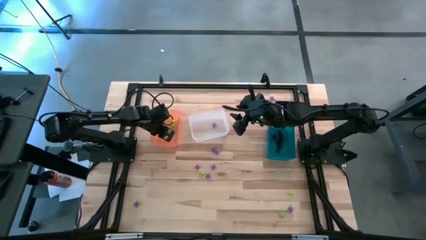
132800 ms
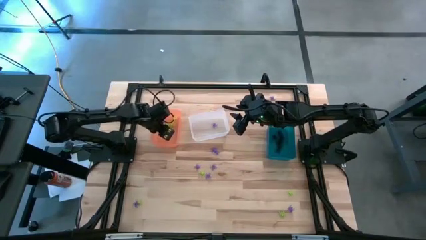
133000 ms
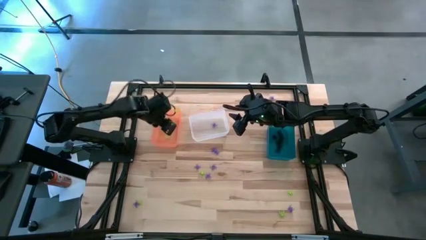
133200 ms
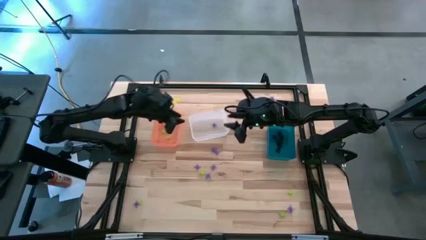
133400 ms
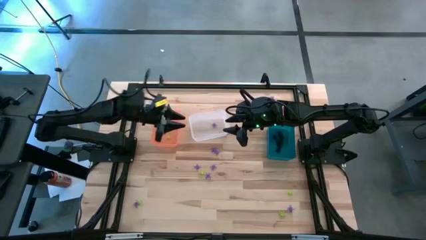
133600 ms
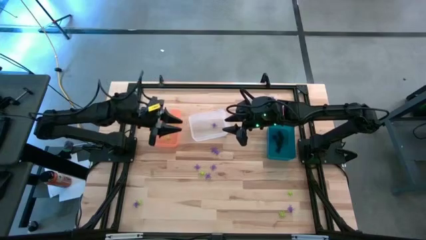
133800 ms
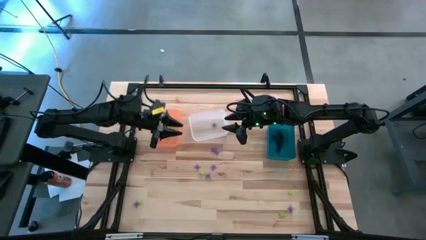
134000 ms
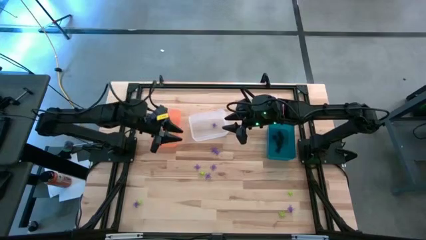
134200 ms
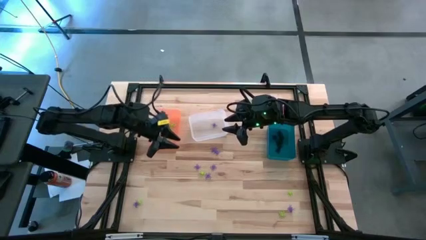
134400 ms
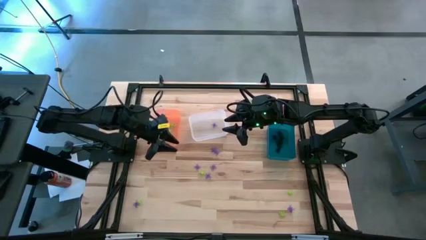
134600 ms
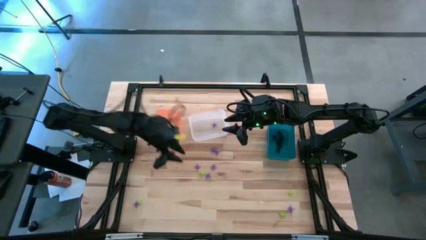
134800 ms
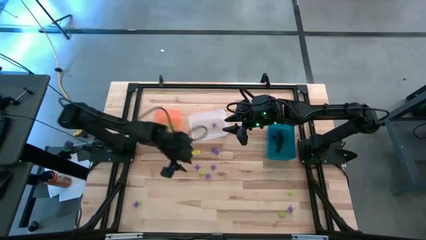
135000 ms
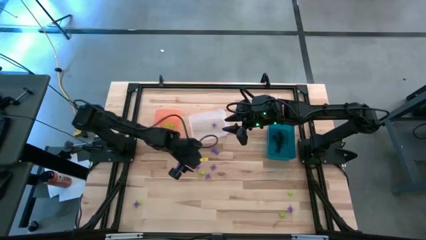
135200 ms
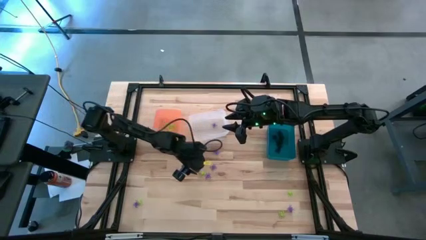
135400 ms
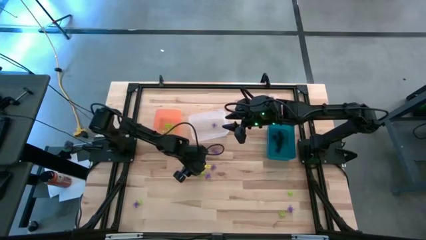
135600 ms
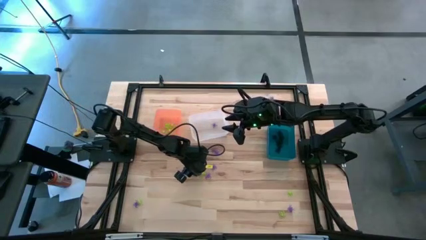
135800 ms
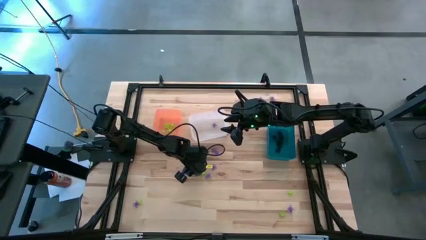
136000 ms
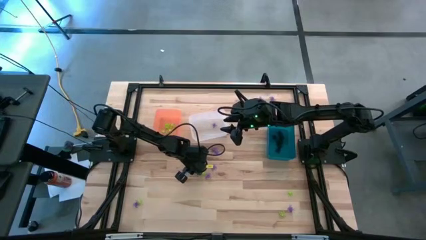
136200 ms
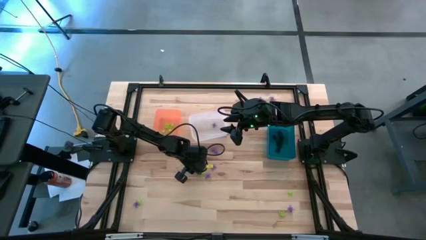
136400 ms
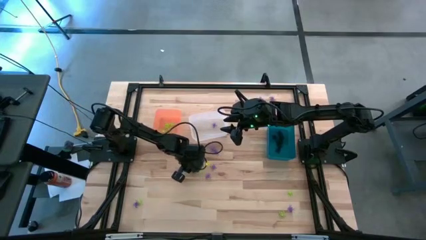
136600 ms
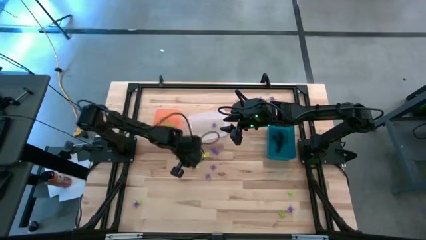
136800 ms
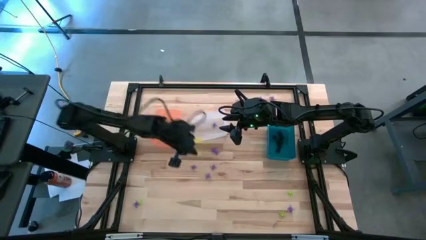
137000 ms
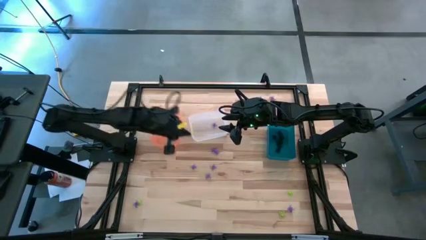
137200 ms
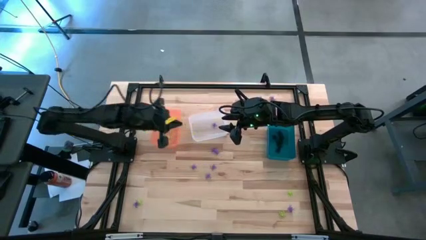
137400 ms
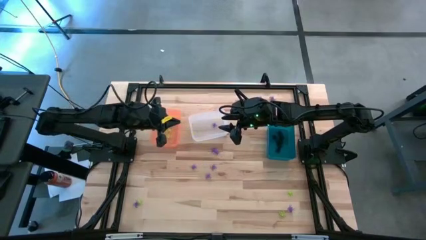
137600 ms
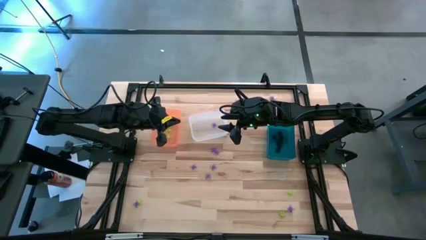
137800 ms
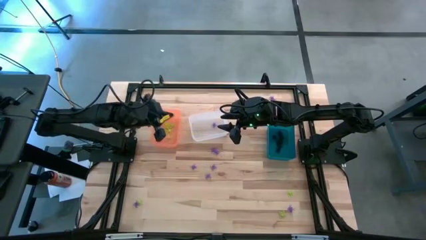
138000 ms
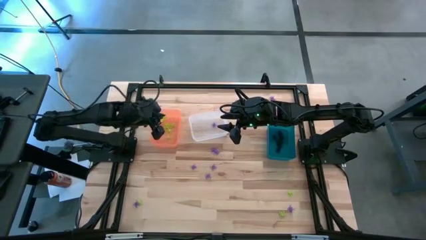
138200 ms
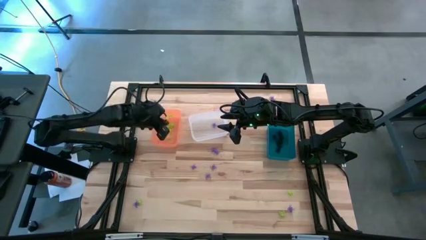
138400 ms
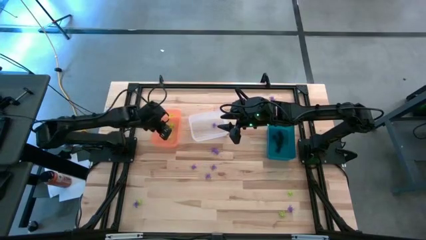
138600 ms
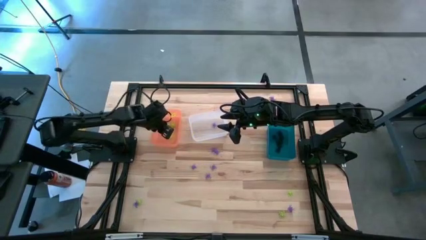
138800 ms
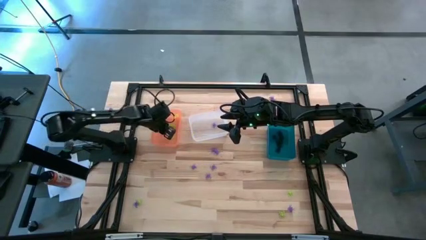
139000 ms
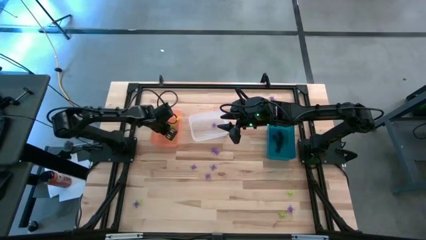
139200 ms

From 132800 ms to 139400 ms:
Task: Sort Halloween decoration
Put the green spider toy into the orange bin

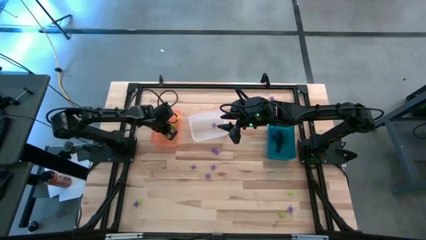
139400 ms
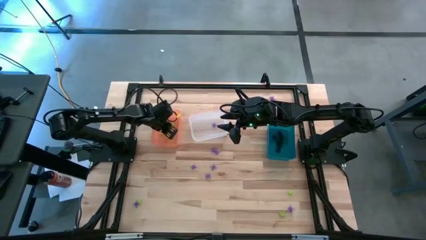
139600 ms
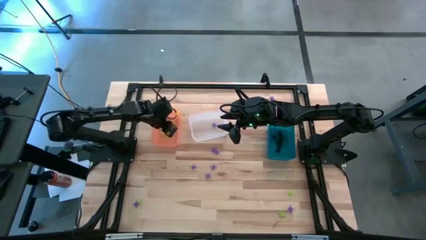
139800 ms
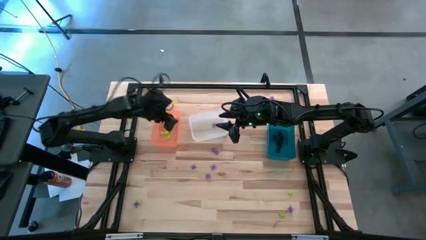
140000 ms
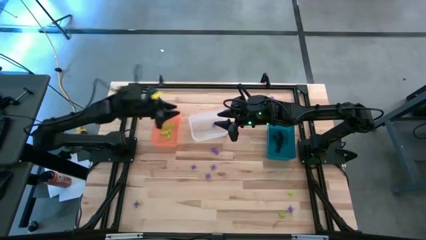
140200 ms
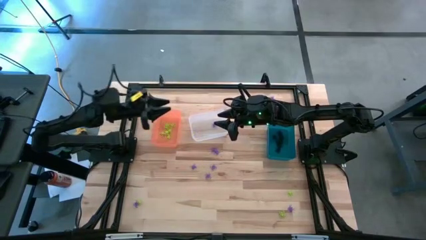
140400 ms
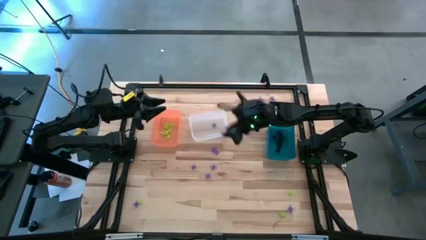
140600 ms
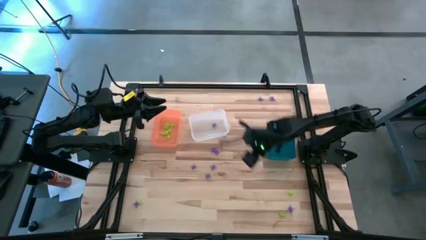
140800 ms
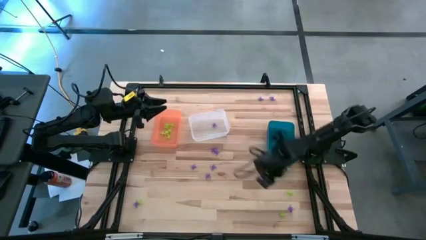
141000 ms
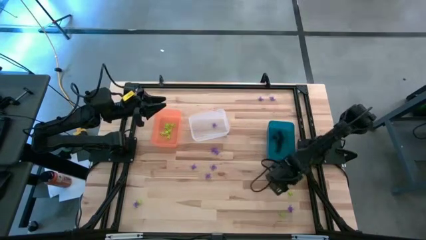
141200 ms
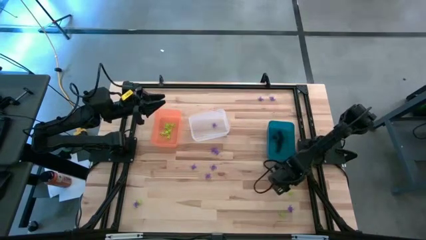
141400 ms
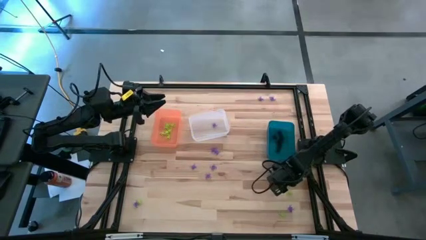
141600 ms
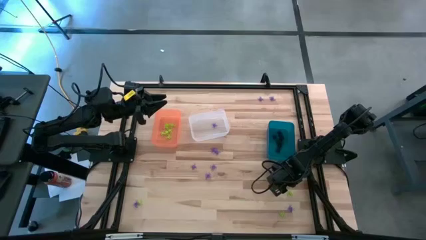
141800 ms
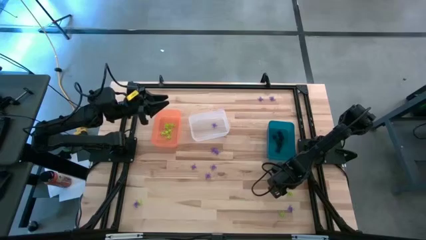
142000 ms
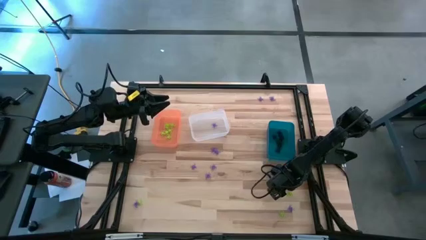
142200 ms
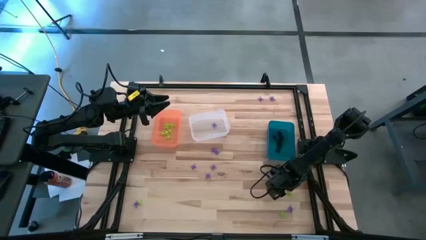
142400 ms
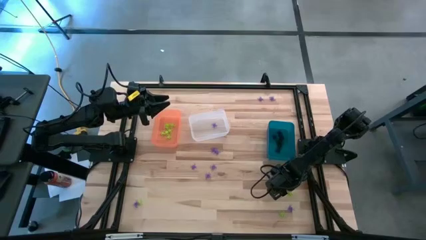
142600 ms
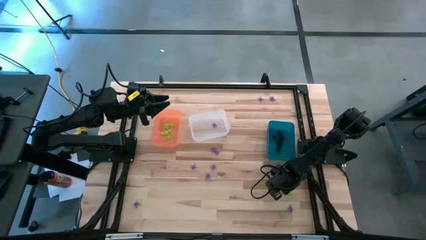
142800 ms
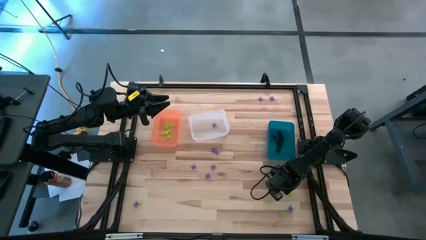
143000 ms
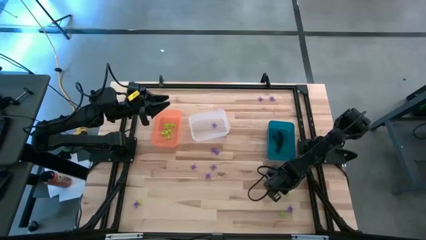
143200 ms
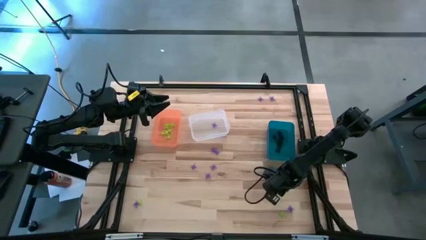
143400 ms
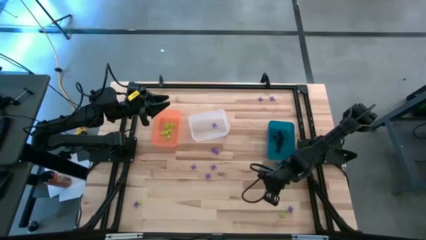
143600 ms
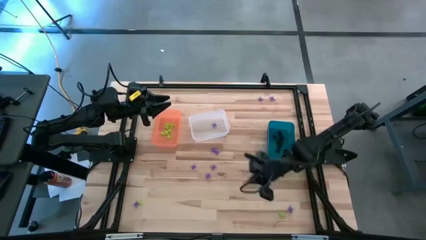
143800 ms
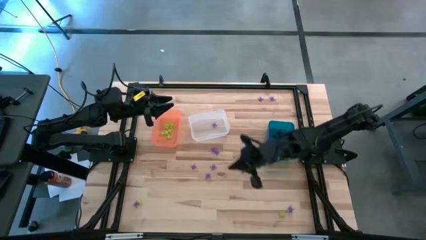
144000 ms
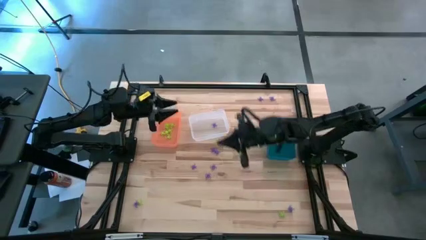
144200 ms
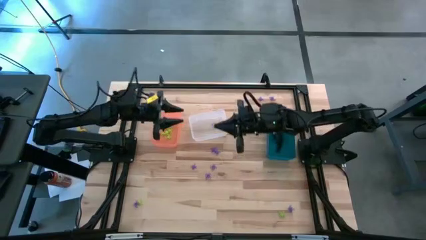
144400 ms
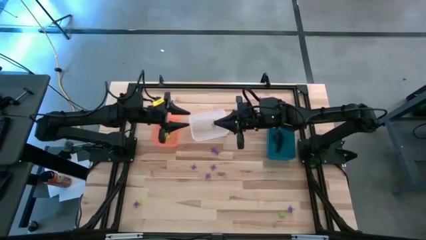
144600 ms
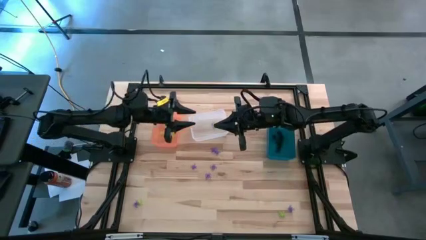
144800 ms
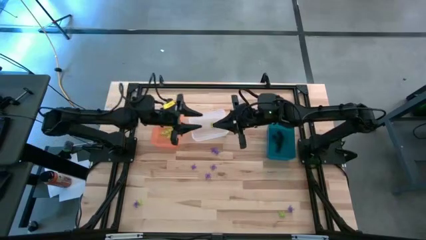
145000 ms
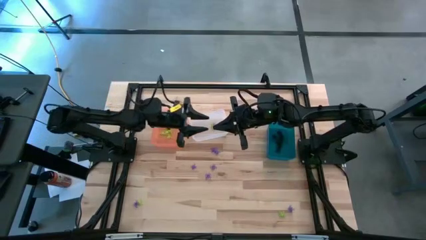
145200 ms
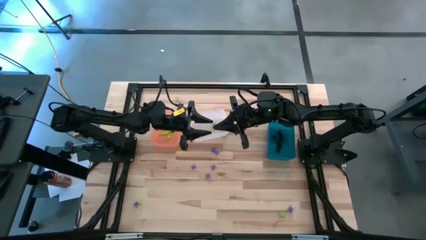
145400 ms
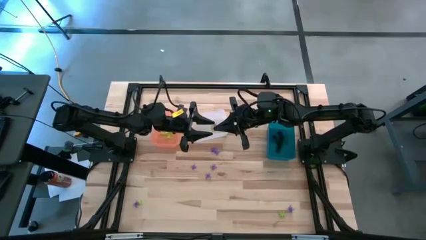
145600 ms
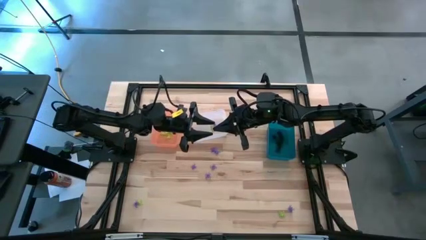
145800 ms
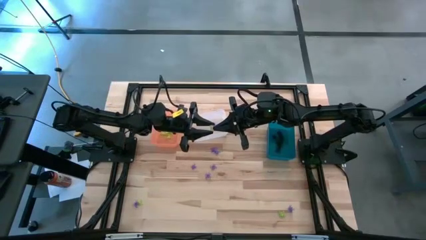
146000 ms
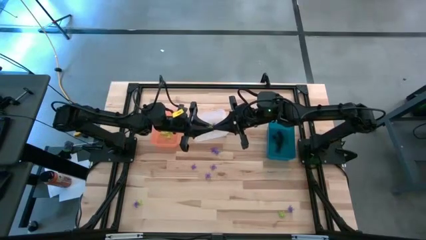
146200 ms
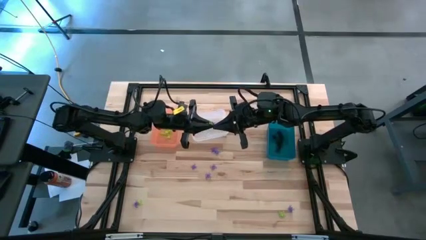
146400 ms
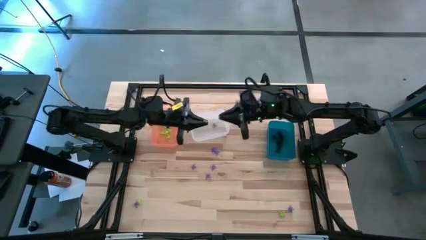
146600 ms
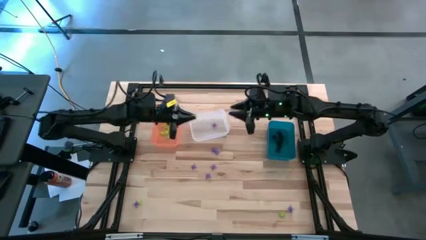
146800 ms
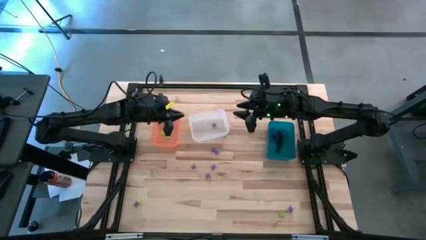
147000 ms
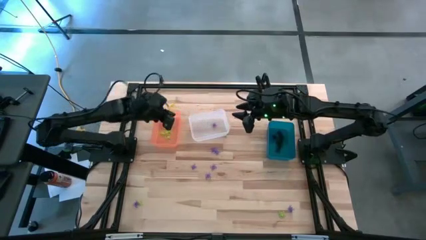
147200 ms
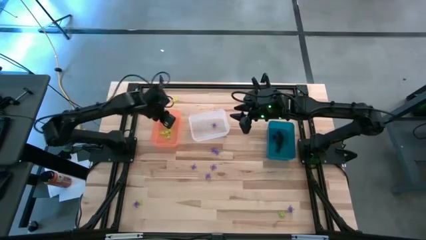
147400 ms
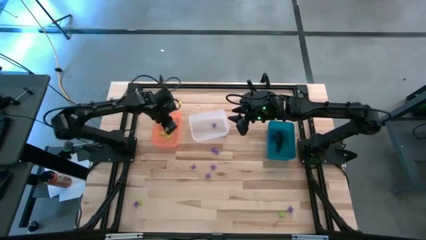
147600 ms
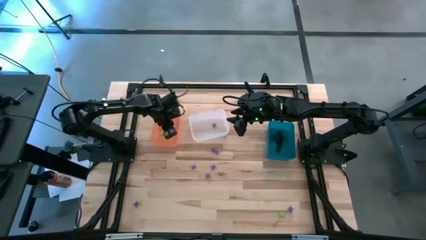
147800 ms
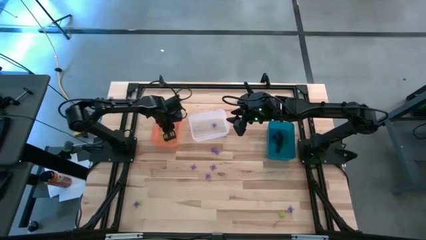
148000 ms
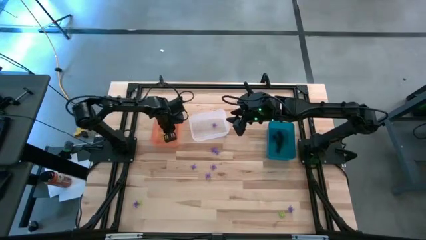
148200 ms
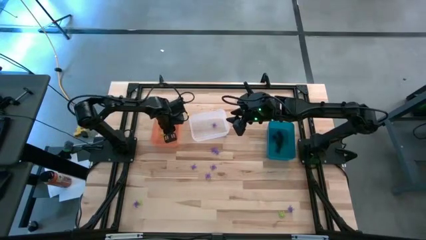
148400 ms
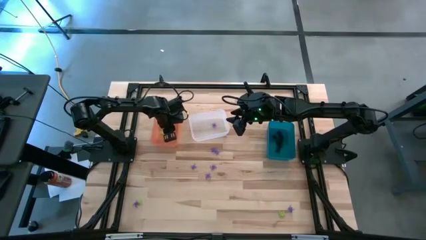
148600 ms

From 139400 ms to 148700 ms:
Put the green spider toy into the orange bin

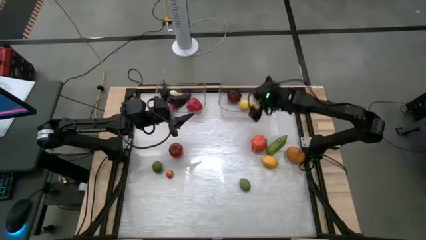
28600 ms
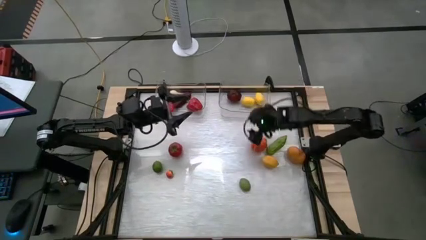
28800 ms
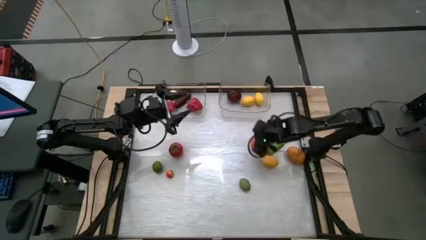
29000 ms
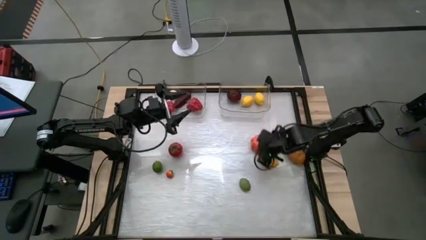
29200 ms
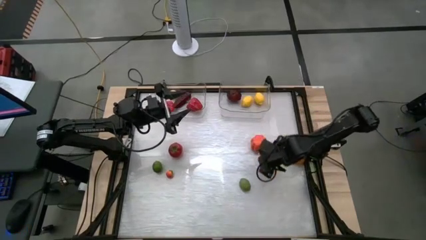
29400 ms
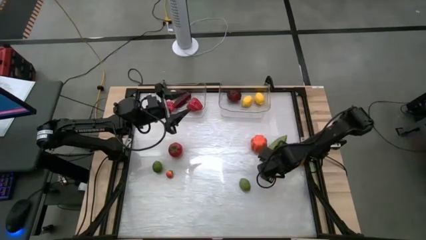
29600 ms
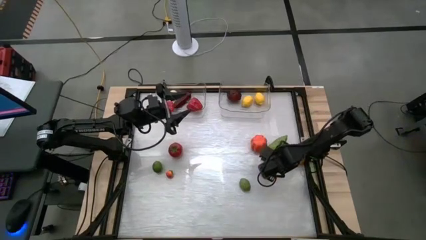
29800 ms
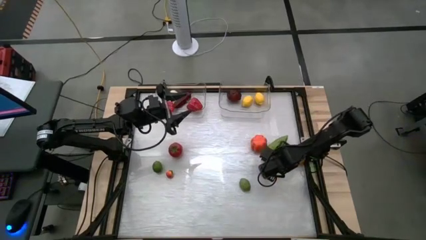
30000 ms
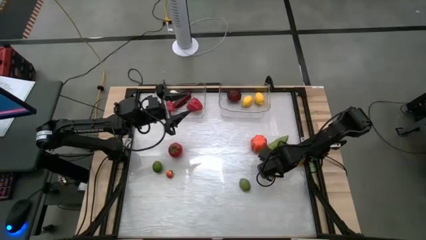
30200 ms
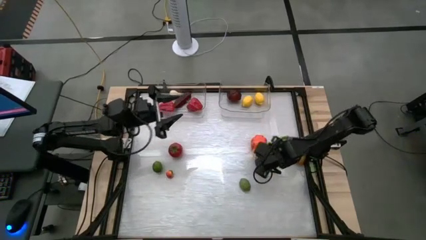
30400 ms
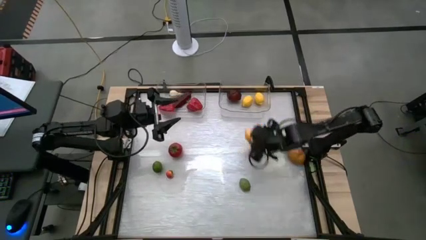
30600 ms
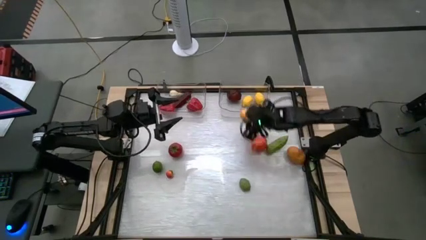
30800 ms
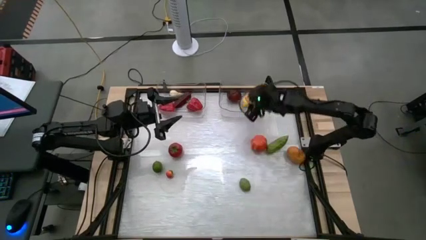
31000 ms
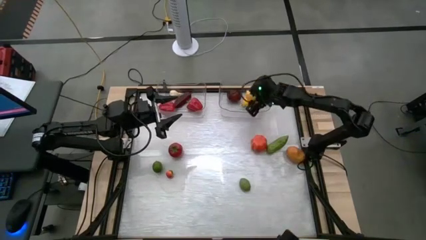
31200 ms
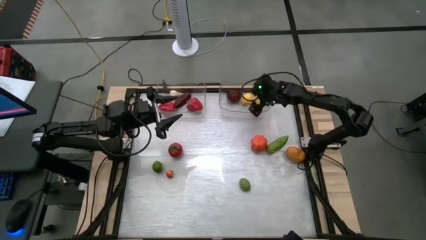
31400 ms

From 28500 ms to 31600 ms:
Task: Sort produce into baskets
Put the lemon in the container
